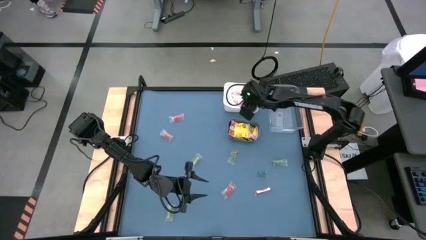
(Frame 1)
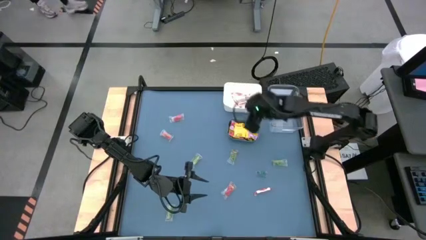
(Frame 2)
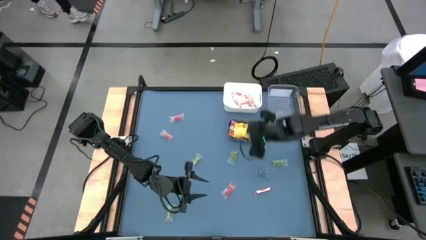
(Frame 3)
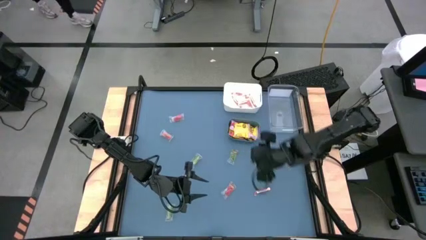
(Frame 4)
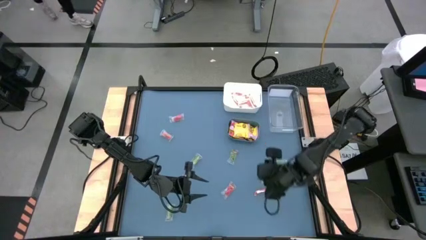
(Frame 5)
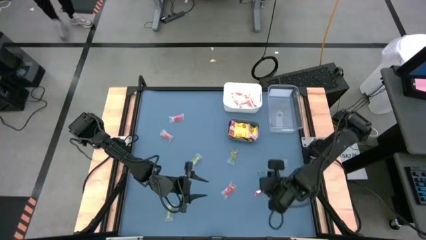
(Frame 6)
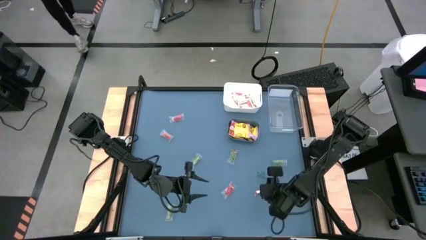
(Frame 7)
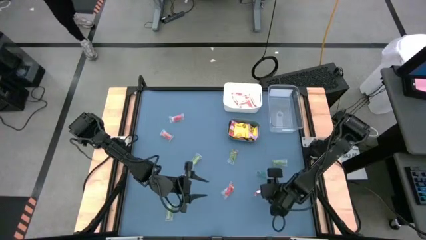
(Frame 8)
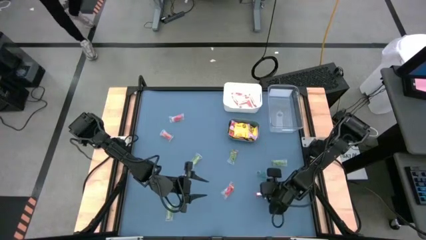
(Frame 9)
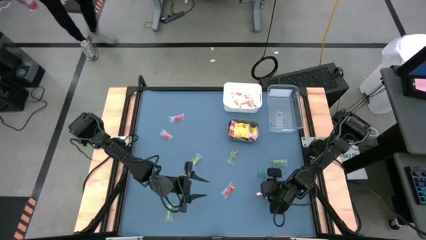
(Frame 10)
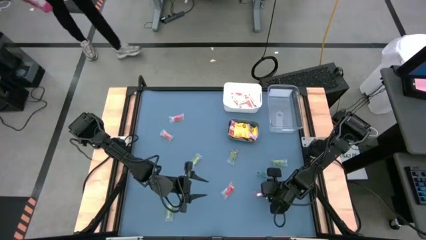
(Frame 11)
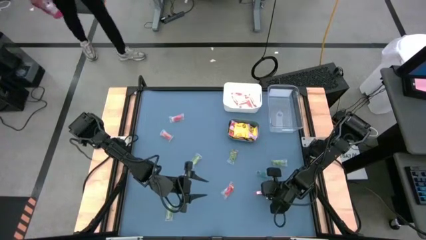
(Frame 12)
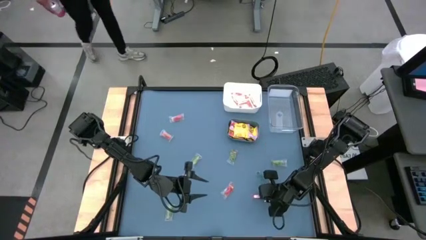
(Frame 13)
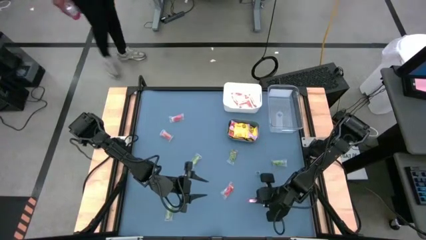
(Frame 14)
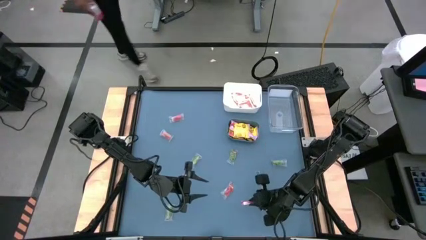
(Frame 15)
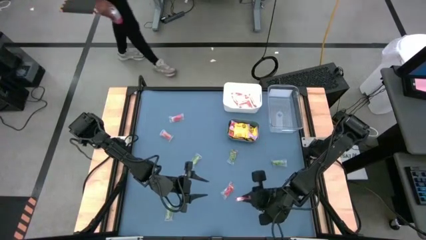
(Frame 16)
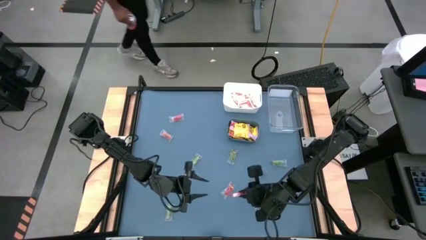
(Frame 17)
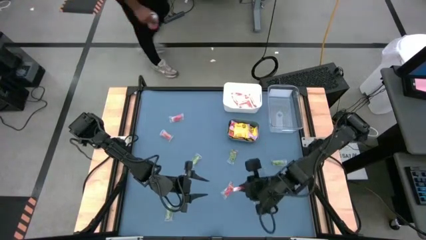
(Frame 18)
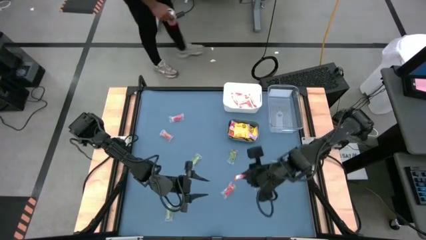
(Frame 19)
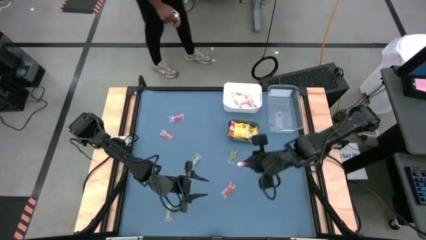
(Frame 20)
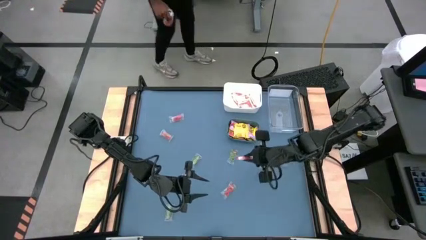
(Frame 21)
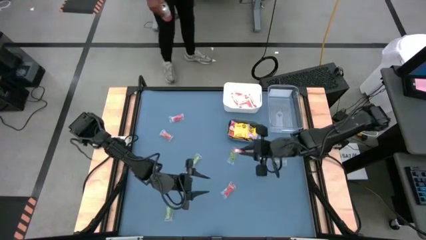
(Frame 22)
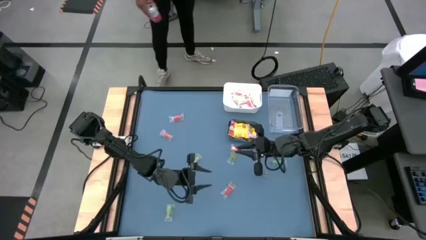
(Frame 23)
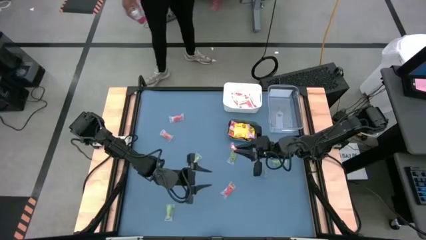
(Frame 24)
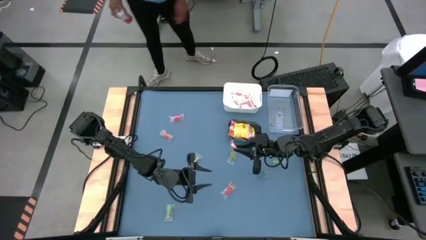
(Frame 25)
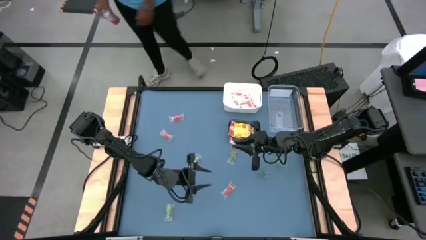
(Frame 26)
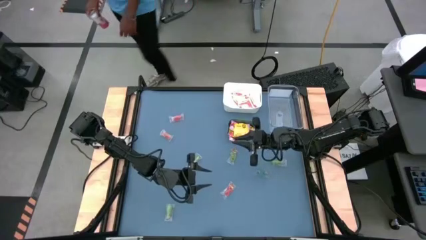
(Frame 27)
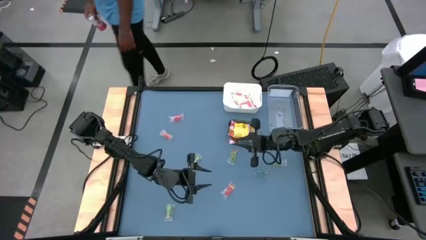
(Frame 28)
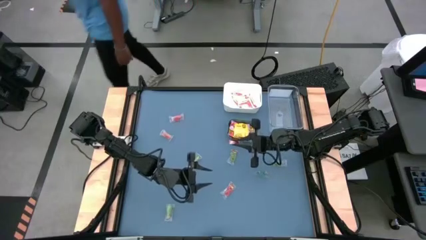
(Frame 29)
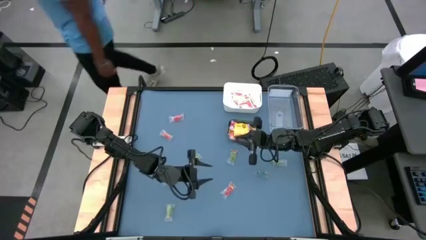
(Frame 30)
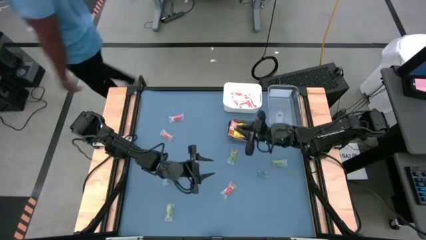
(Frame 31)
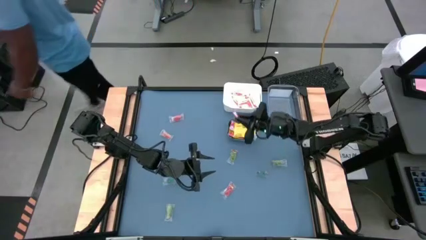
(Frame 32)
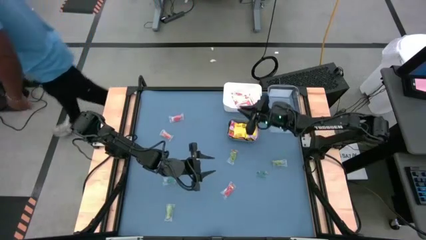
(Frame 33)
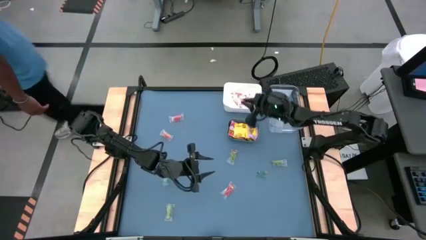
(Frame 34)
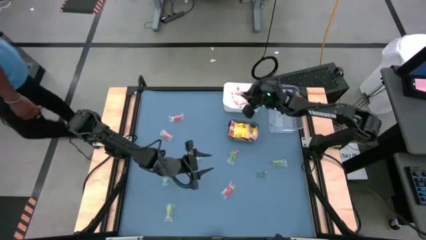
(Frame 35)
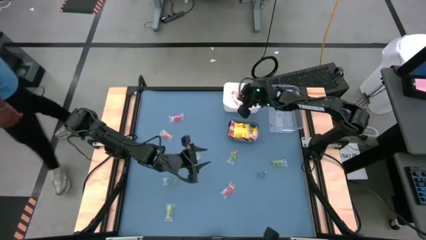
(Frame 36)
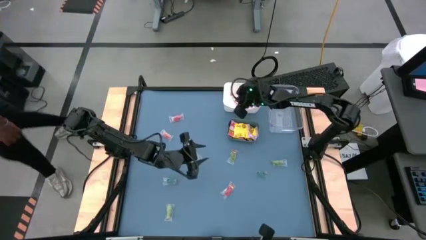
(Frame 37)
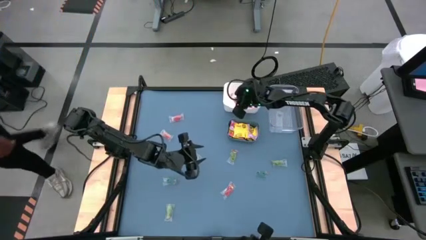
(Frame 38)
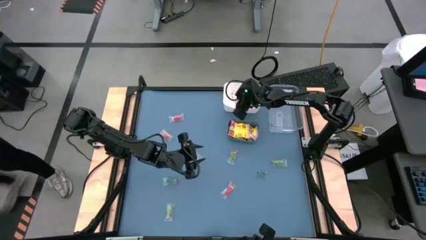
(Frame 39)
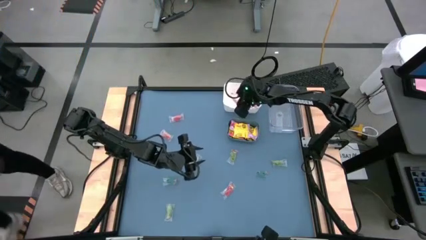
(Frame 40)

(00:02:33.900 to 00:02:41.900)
Task: Sort candy
Put the white candy into the white bin

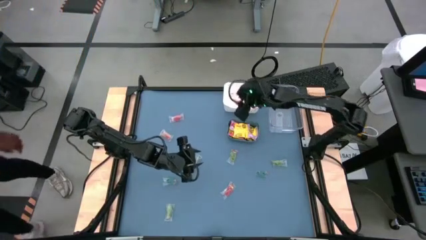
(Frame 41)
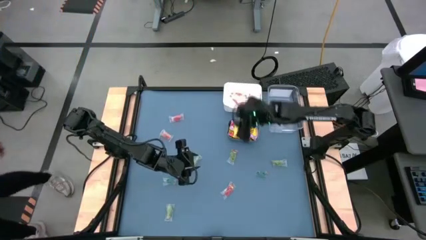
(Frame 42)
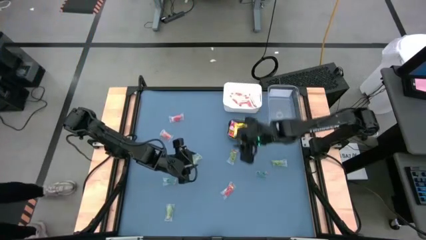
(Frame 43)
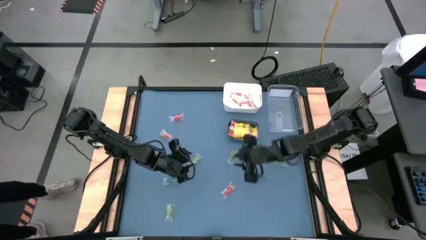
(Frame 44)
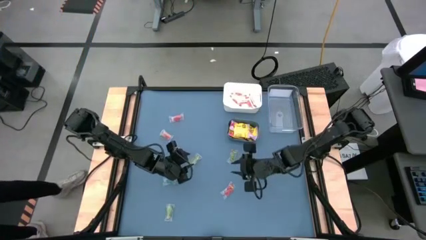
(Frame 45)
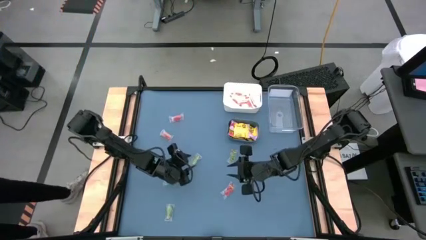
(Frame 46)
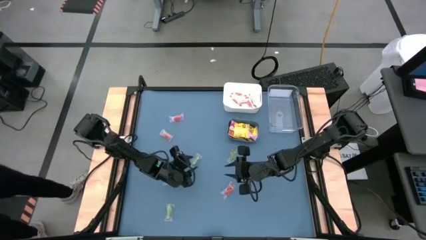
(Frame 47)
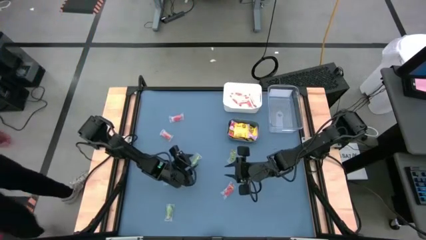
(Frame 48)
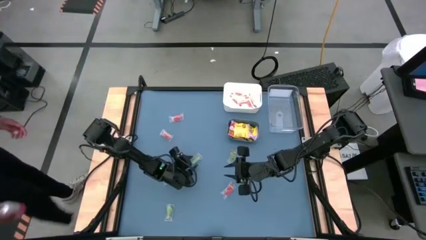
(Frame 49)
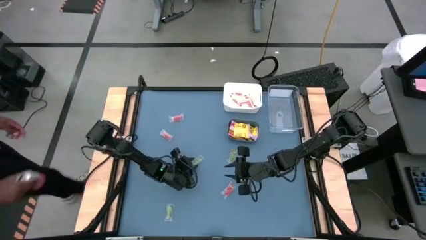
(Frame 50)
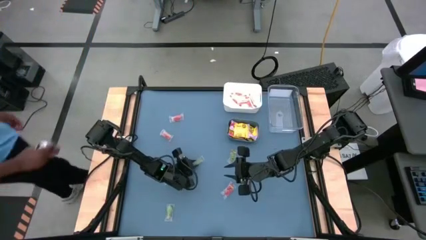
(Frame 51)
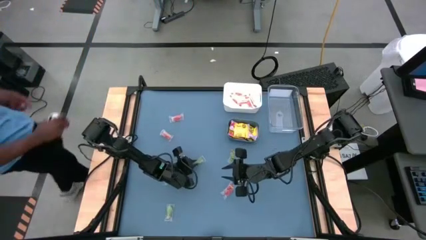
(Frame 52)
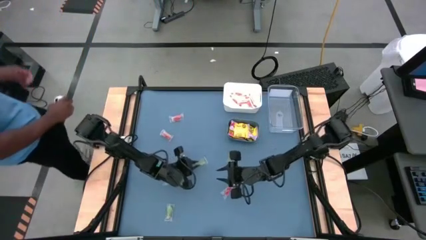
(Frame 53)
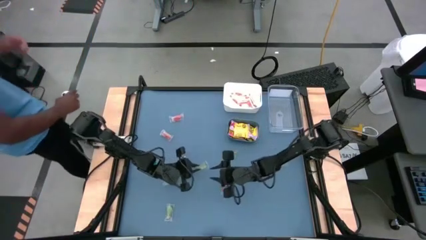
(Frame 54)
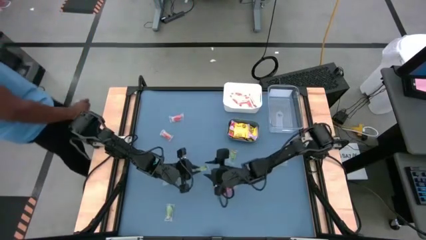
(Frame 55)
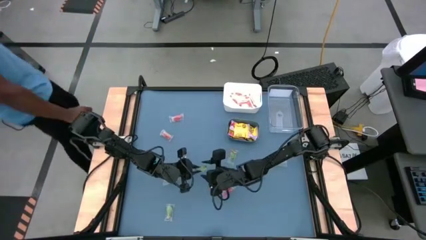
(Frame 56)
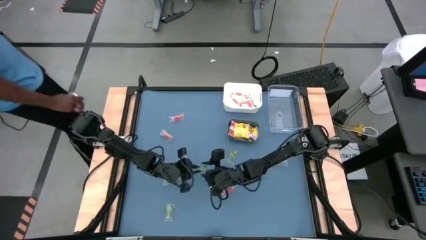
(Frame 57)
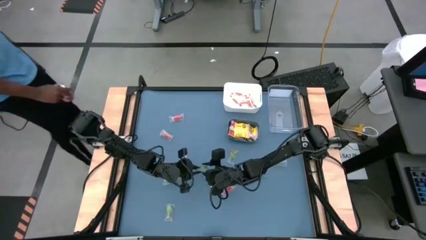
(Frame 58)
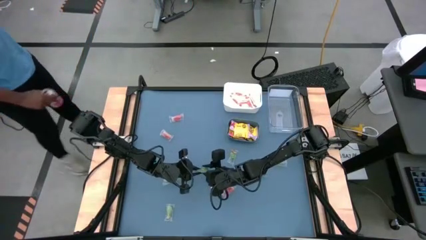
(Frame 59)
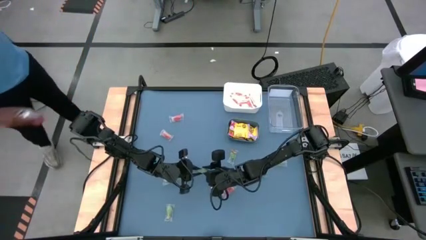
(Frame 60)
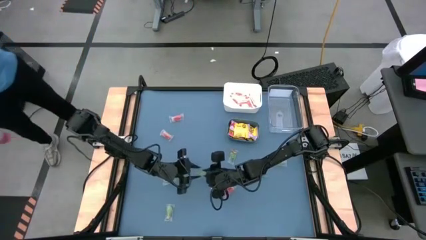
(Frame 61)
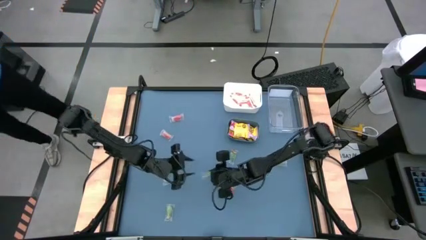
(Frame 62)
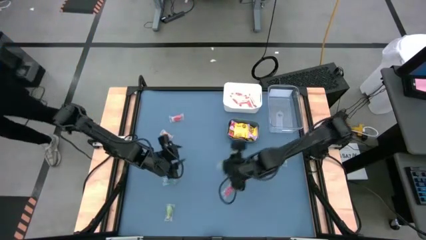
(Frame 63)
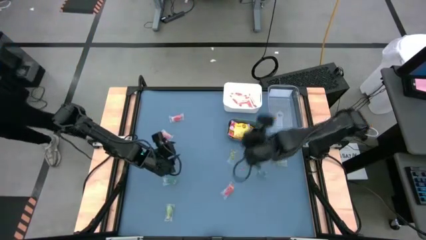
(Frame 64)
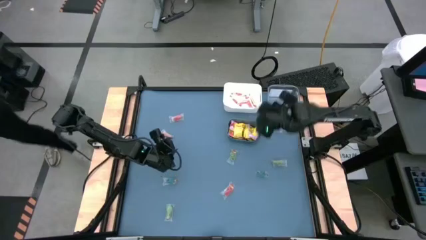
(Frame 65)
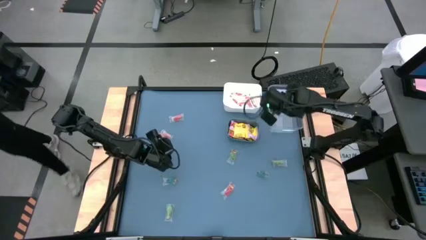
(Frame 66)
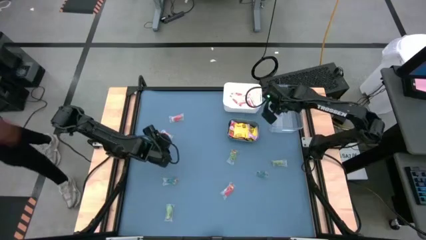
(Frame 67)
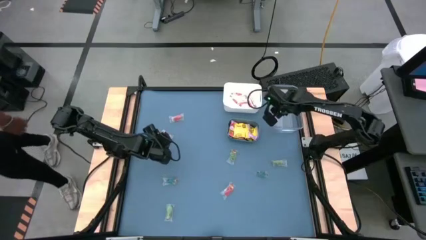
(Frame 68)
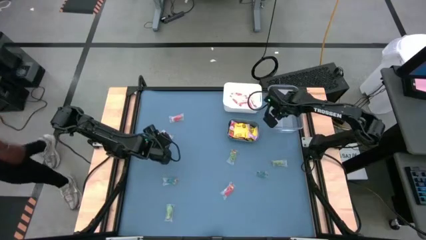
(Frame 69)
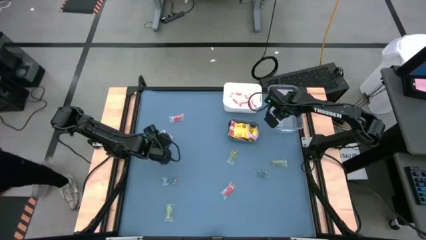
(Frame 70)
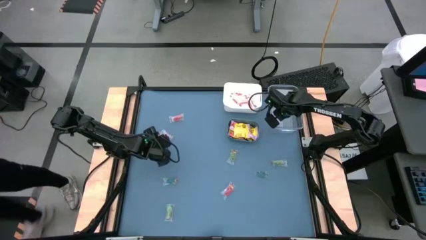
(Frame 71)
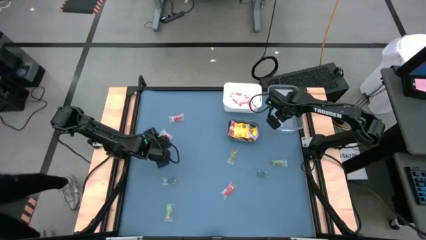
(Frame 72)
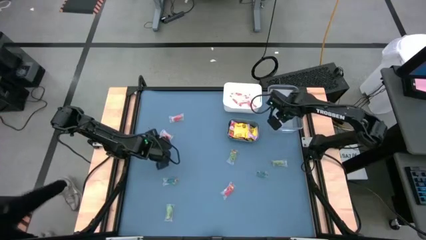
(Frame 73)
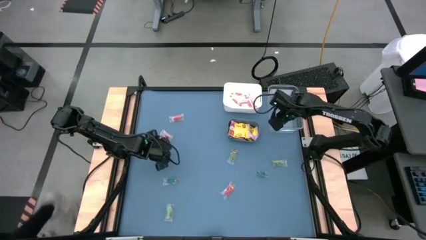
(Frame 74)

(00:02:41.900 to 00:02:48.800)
Put the center green candy into the transparent bin

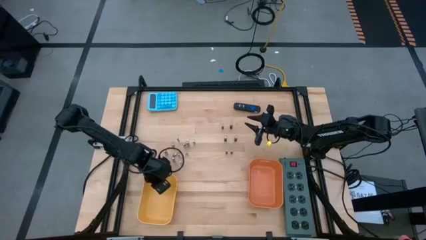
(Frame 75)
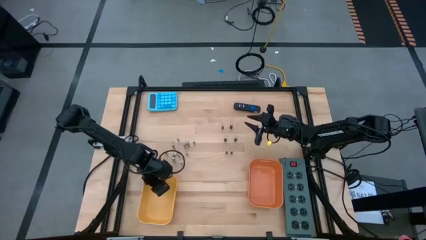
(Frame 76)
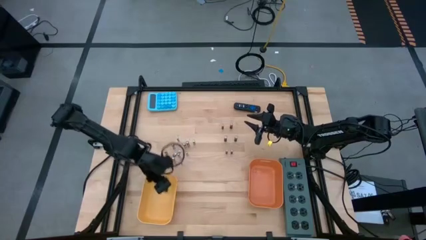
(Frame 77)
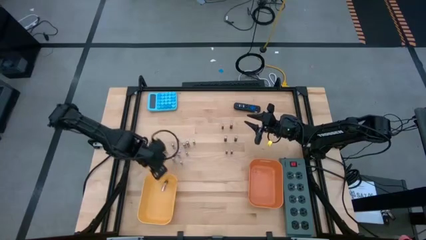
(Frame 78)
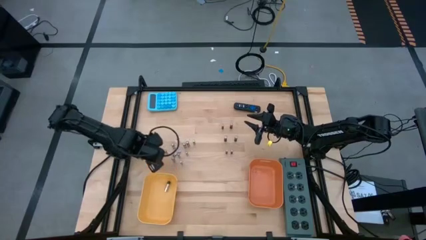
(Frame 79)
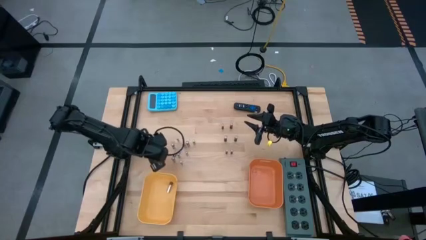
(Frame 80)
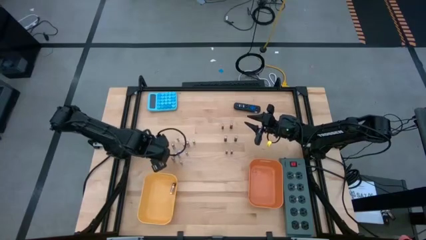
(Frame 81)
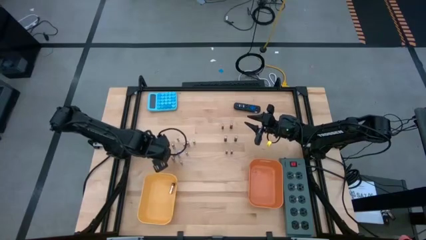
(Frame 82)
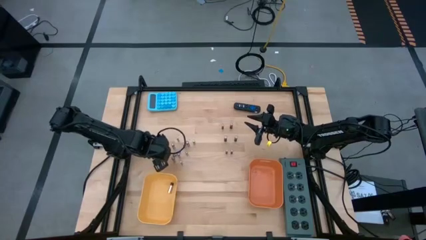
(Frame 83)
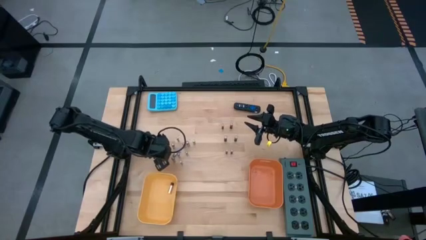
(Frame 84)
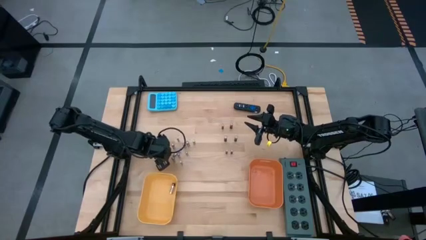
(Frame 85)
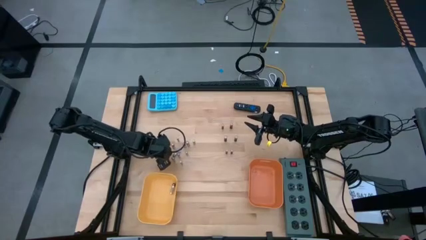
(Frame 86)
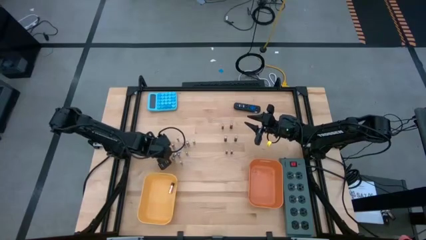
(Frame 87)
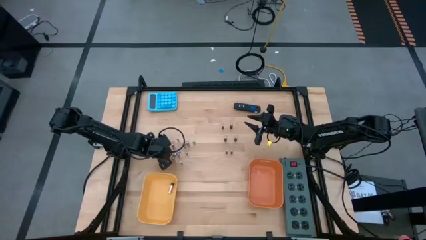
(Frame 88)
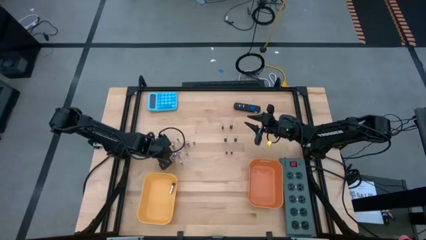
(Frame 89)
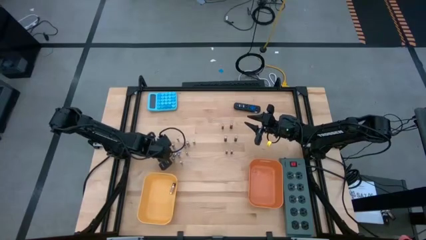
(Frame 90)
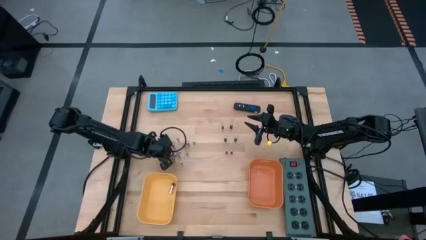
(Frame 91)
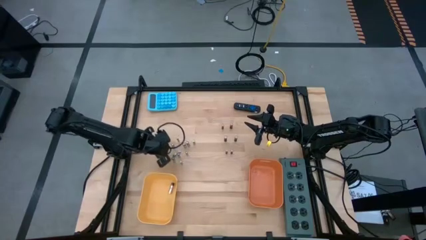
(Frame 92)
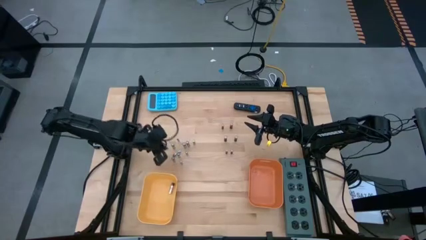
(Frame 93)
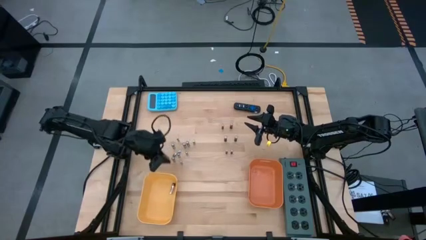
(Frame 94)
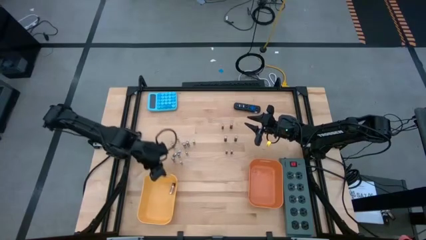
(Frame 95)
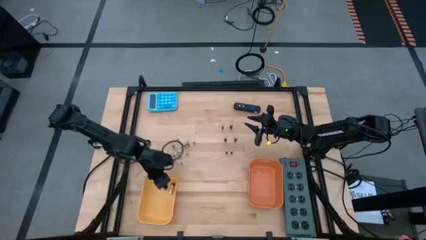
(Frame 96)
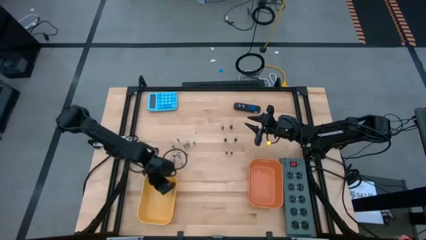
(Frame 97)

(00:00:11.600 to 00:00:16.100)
Task: Sort batteries
Put the silver battery into the yellow bin
